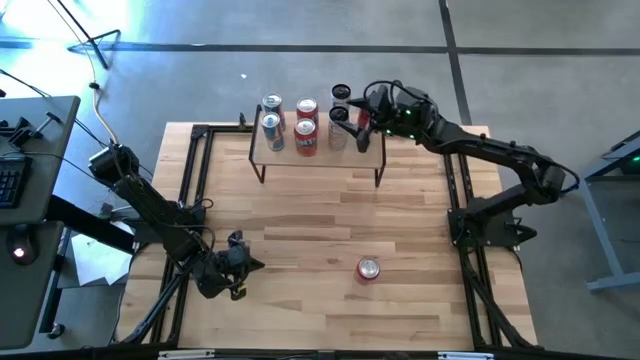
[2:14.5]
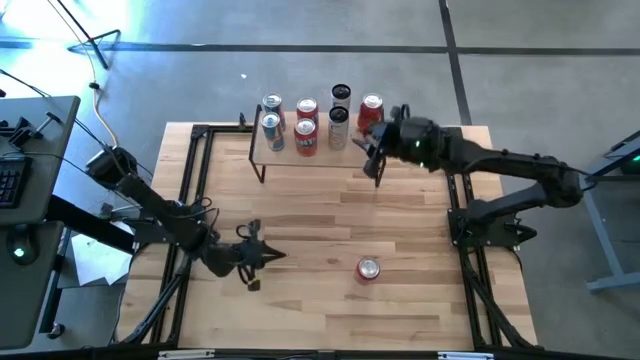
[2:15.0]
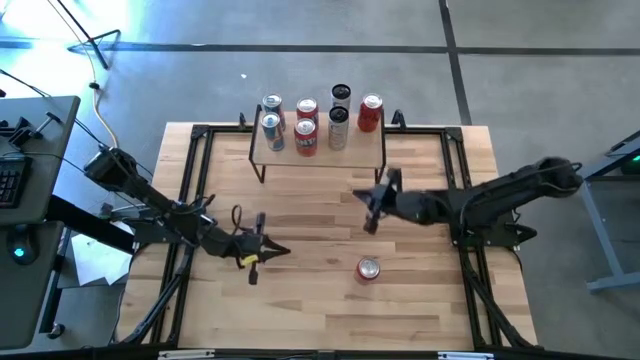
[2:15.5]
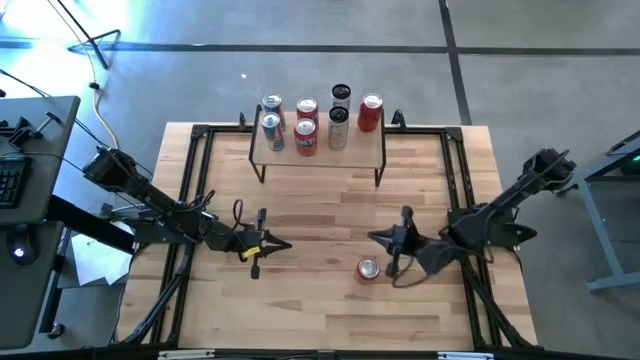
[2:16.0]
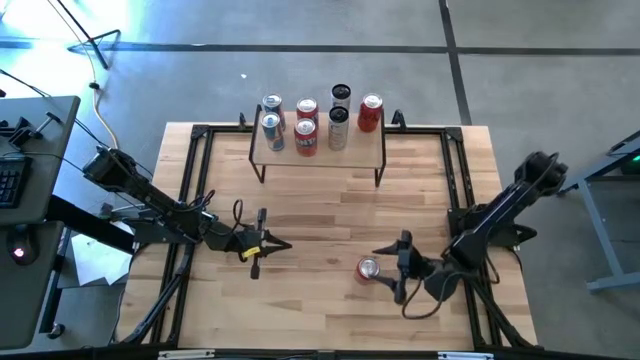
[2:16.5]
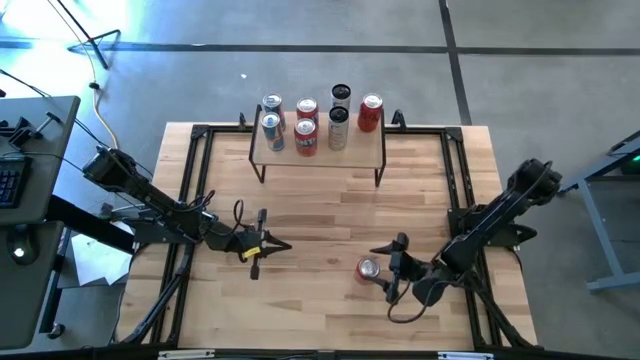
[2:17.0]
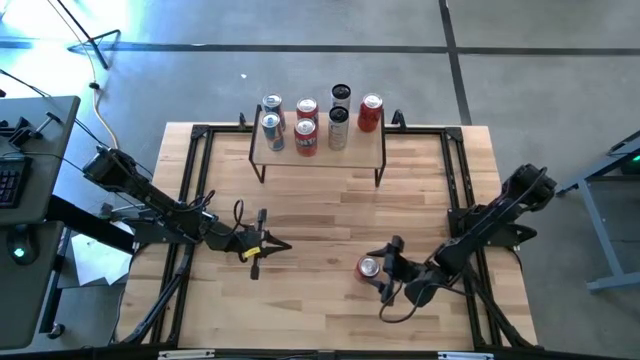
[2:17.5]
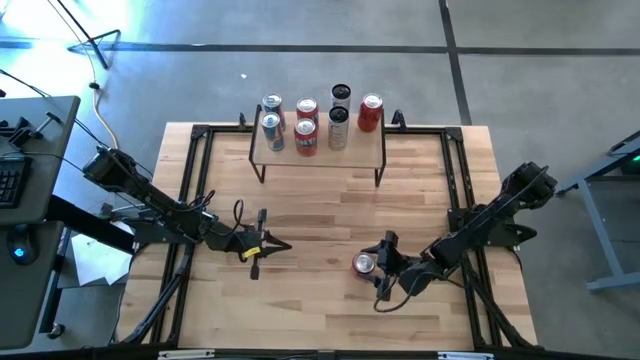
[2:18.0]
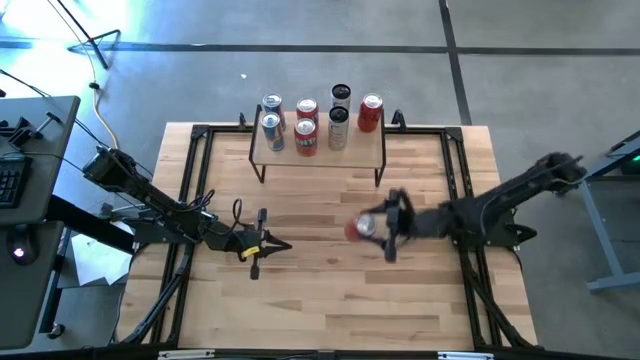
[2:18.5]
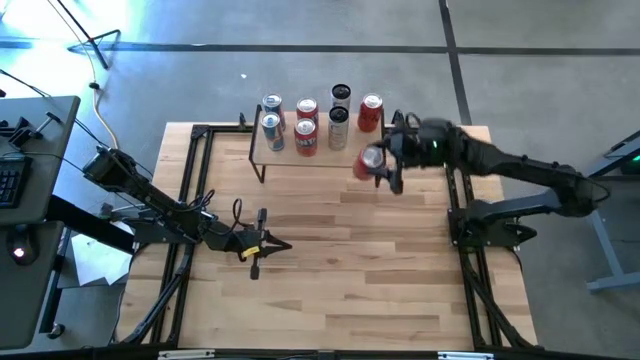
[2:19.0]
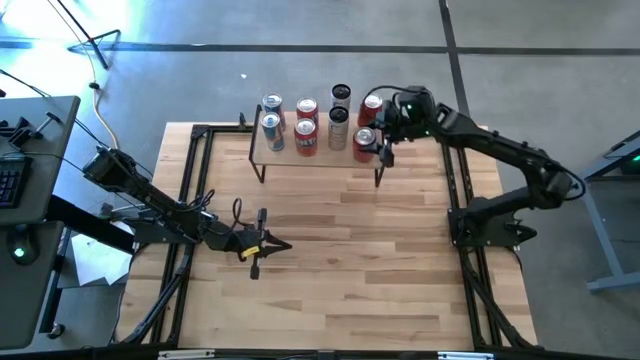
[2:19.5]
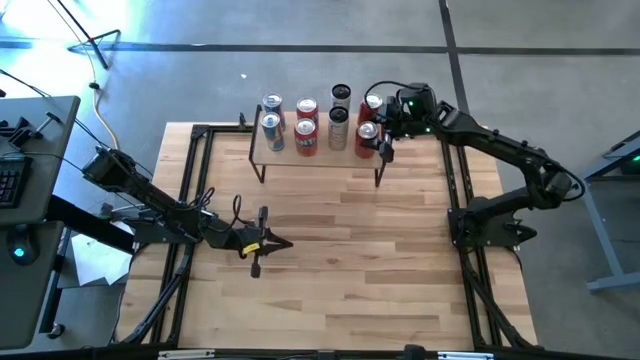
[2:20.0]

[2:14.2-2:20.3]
Task: Place canned beverage on shelf
Put the red and black soda can on the shelf aligned with the other red and black soda can

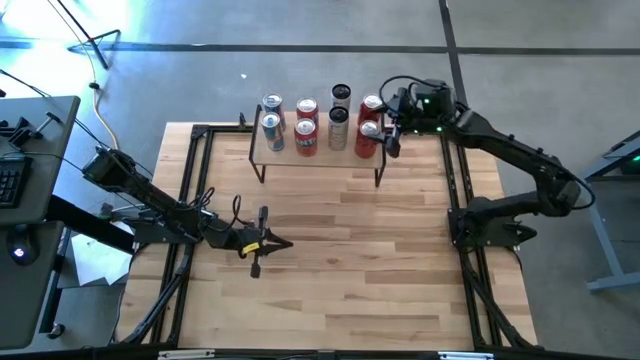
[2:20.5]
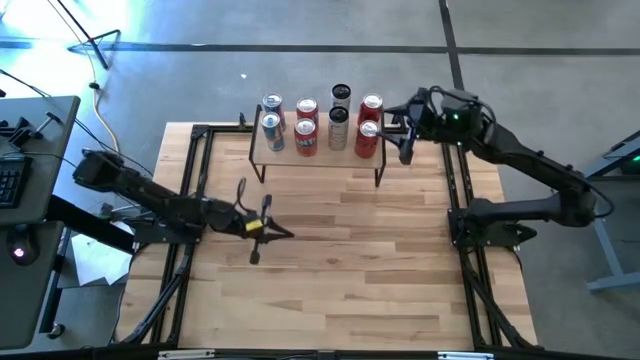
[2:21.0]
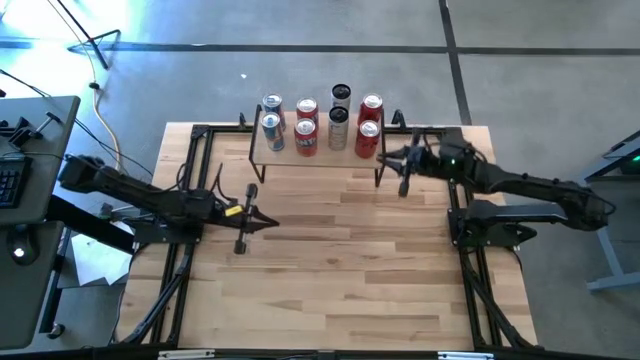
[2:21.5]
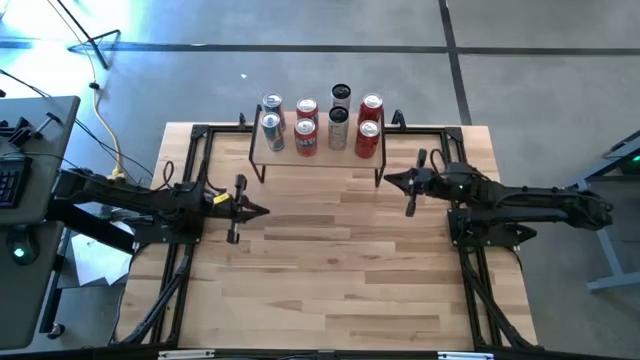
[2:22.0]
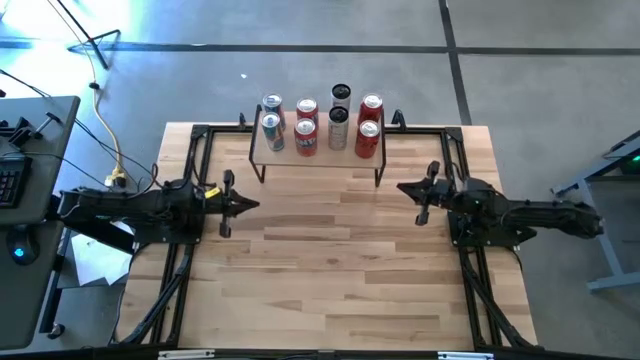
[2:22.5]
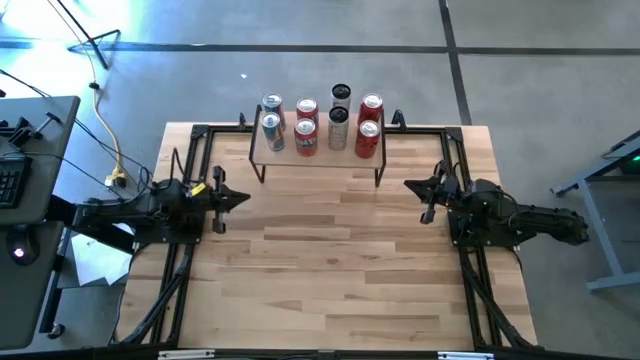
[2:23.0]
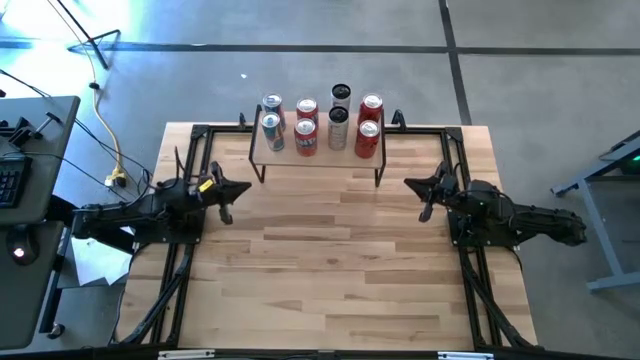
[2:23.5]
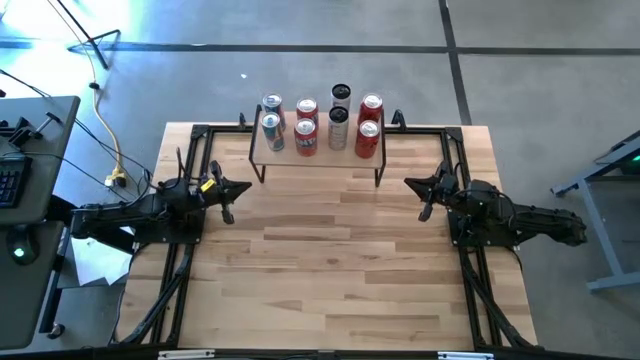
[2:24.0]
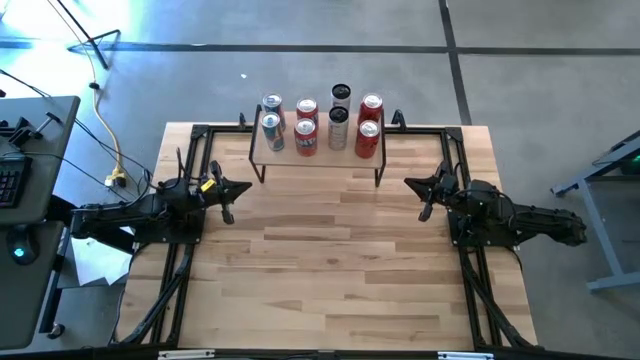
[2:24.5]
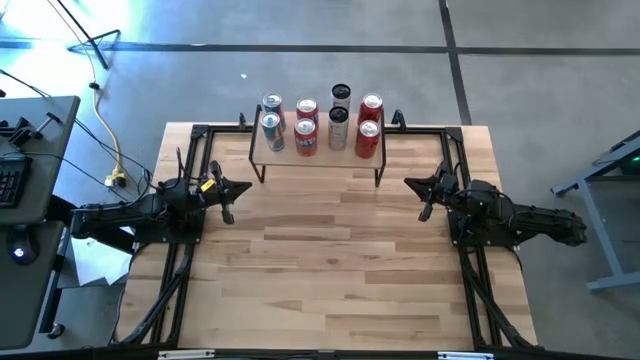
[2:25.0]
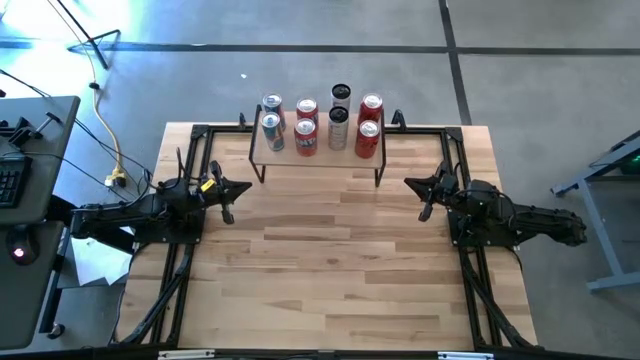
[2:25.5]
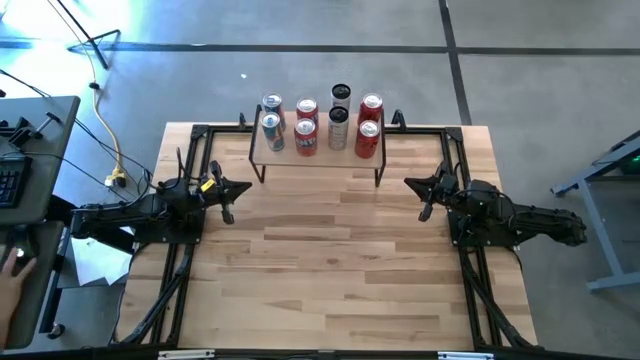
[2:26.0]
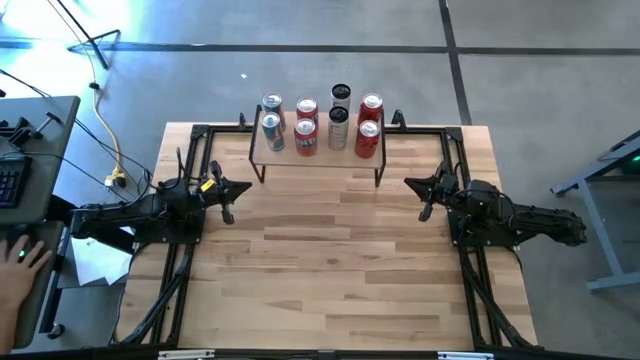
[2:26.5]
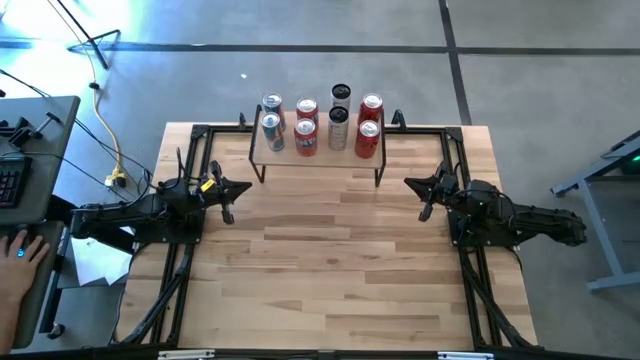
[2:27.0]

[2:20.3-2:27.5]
Return to Home Position

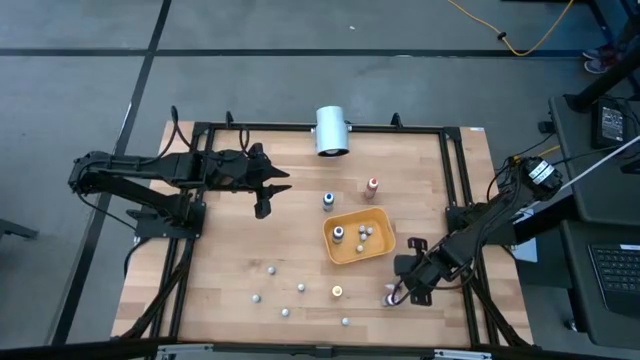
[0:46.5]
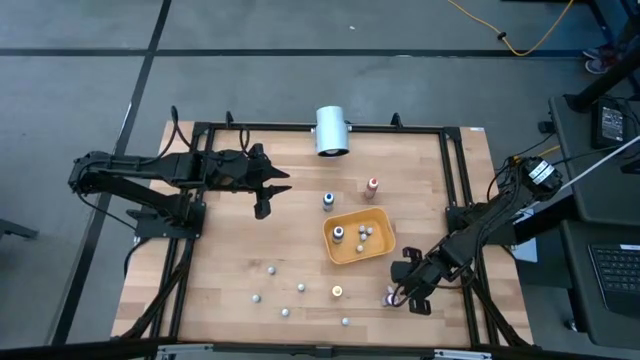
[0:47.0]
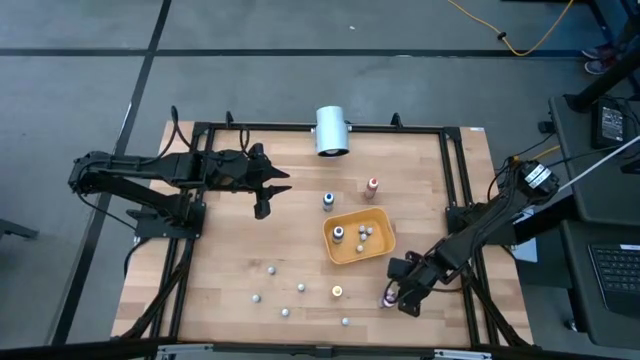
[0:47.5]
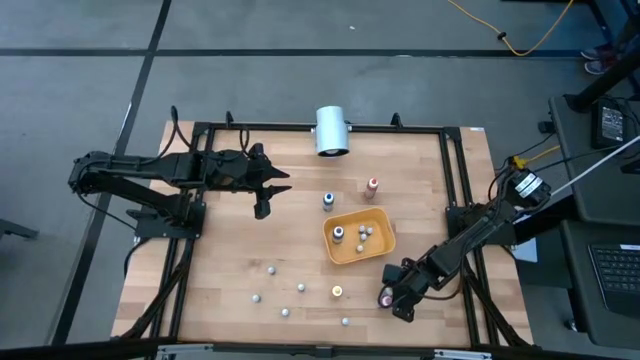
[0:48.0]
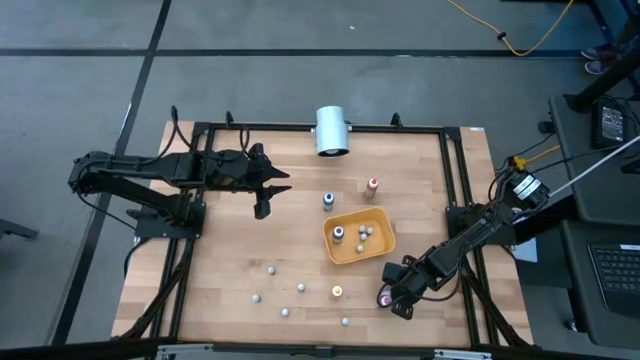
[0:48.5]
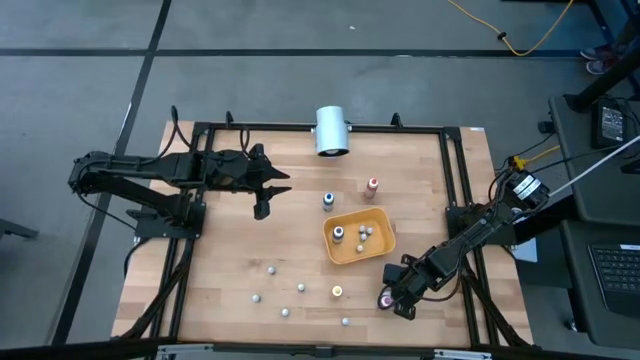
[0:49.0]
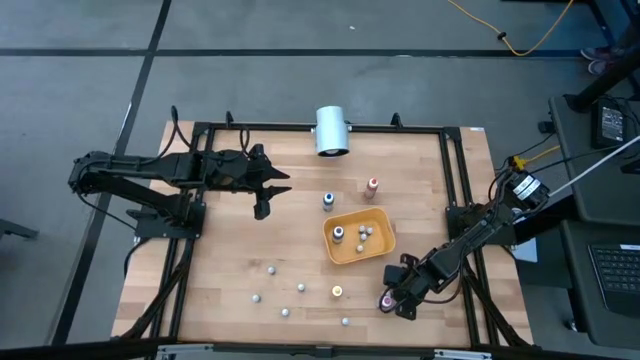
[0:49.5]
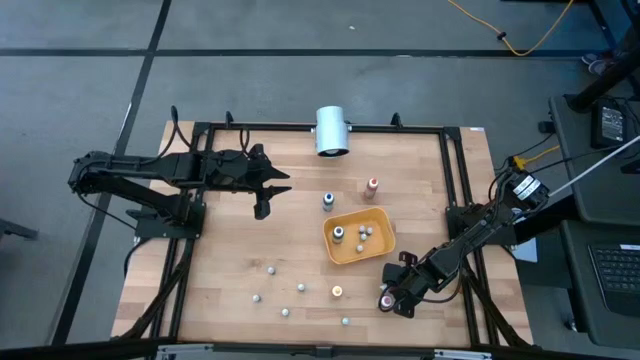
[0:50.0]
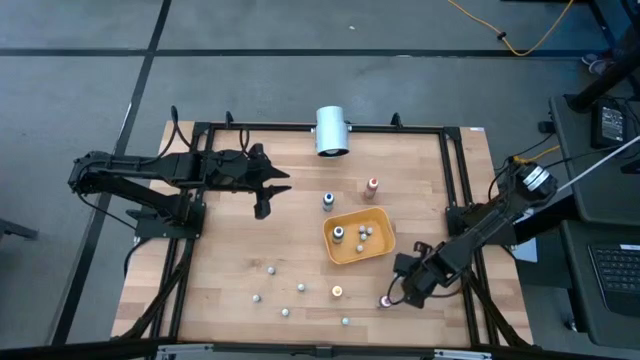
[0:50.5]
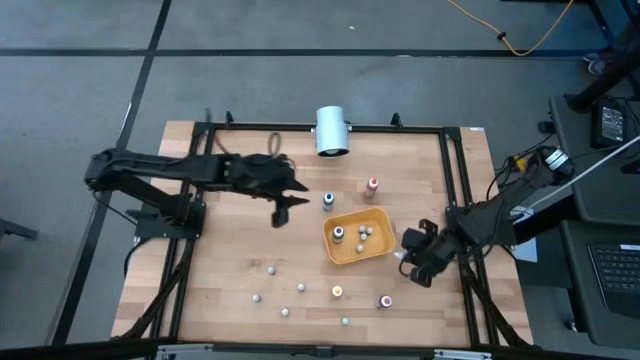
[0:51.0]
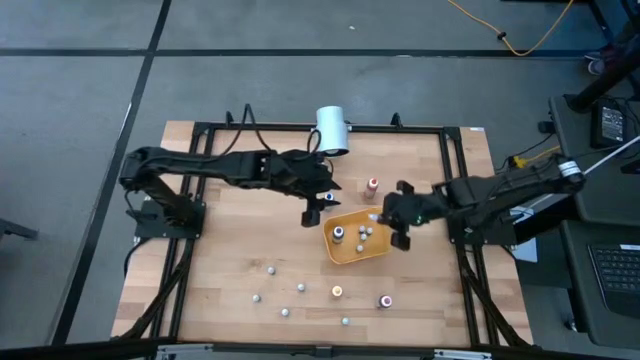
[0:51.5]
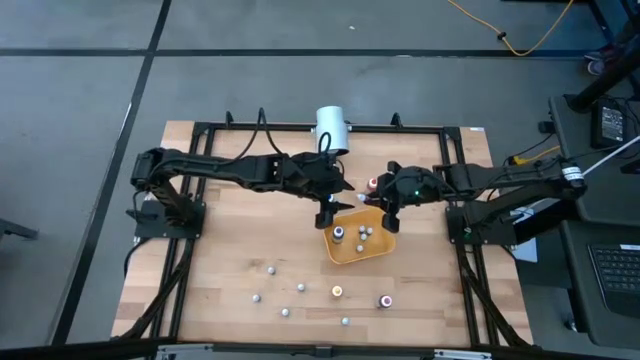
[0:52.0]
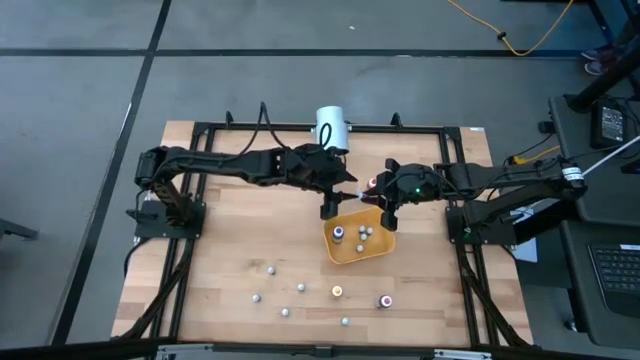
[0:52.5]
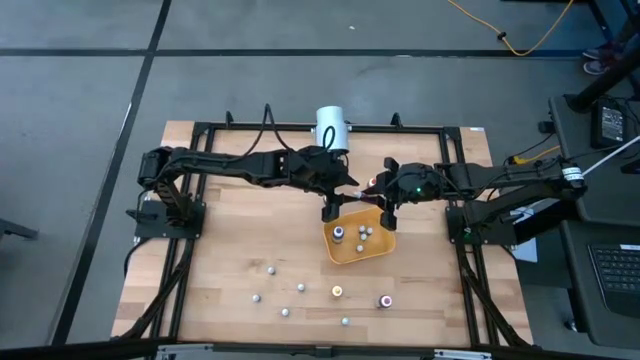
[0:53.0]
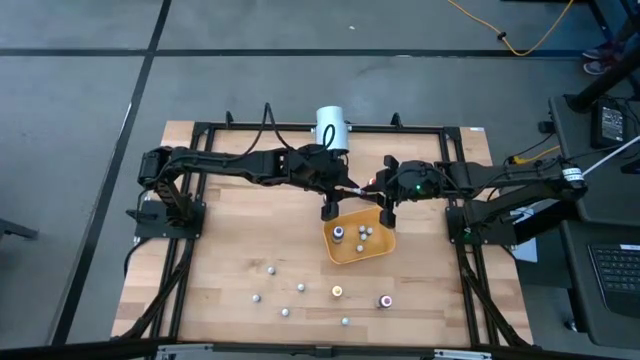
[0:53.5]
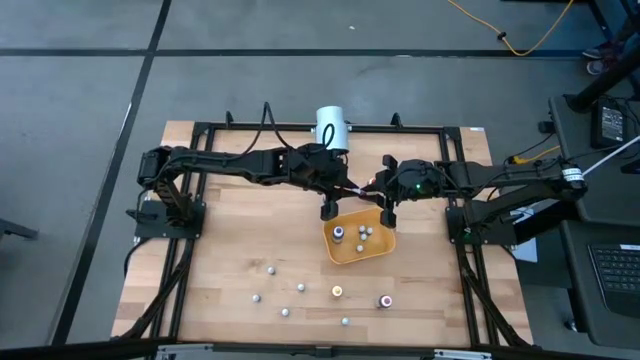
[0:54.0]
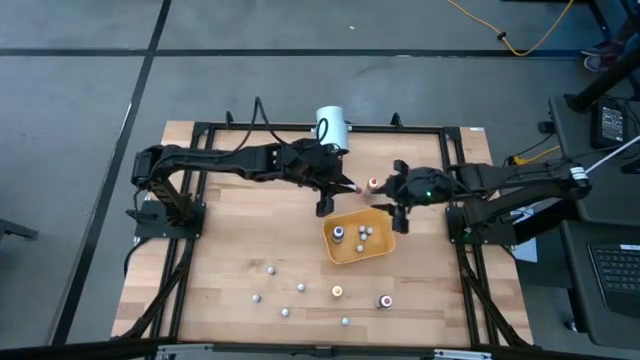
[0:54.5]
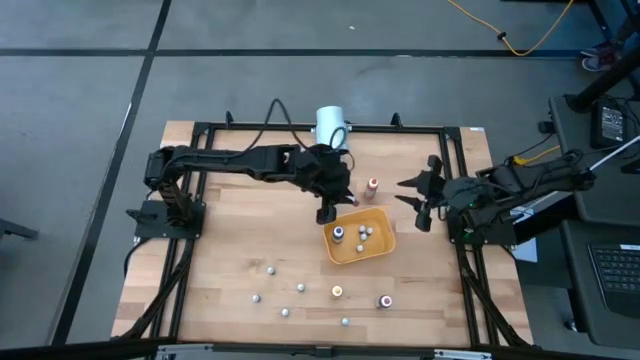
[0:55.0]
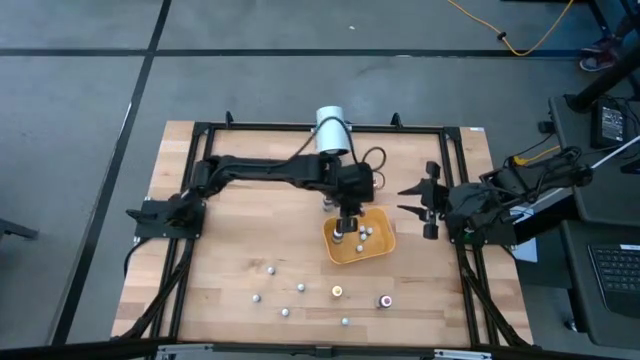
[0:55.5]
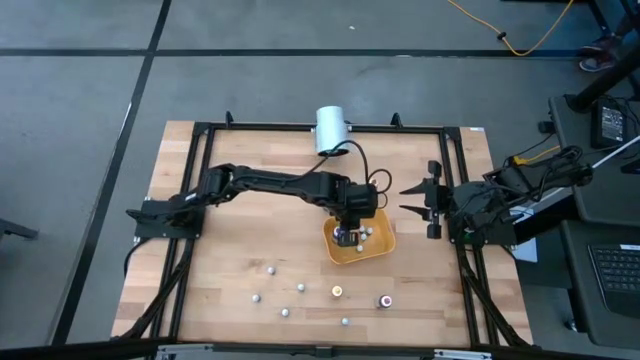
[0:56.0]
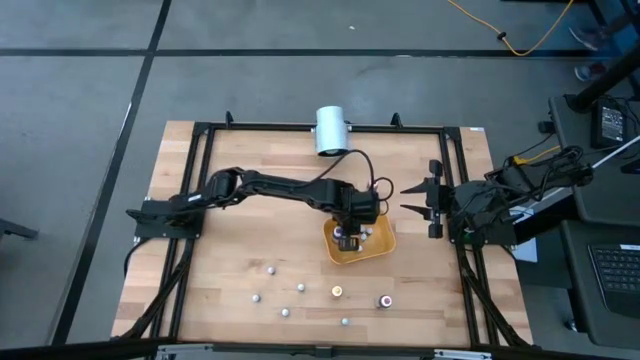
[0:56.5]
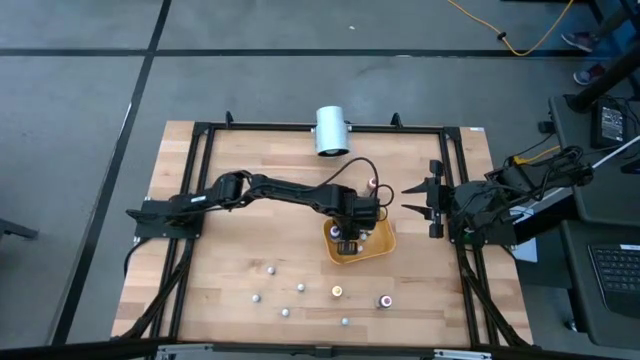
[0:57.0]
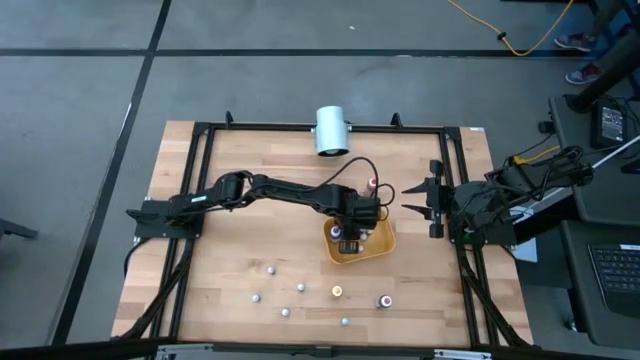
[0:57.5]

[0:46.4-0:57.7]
Task: Pick & Place food coloring
Put the small pink food coloring bottle into the yellow bin
